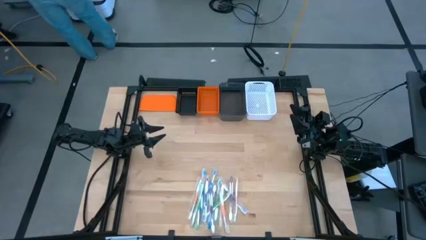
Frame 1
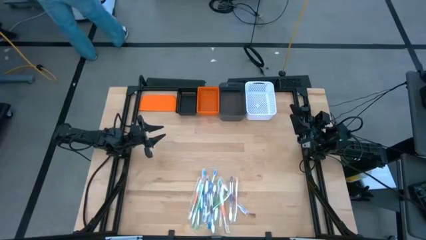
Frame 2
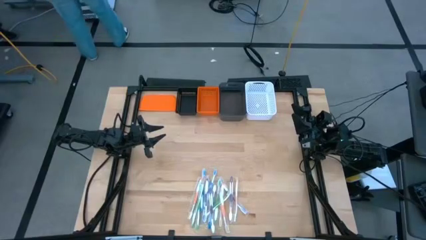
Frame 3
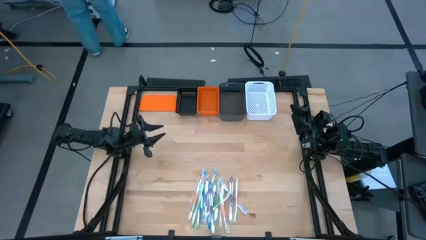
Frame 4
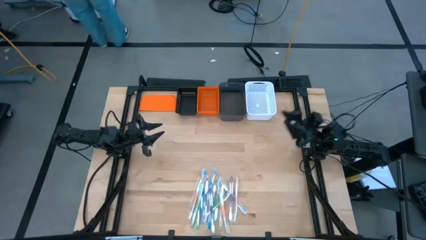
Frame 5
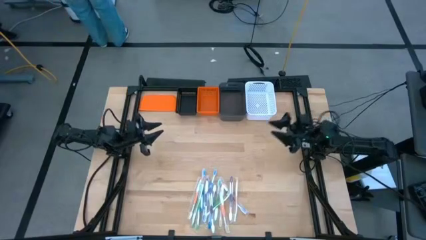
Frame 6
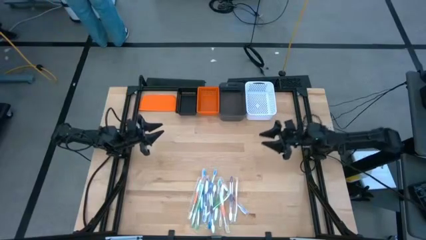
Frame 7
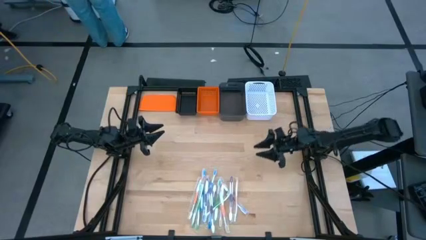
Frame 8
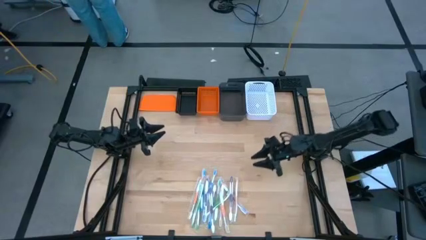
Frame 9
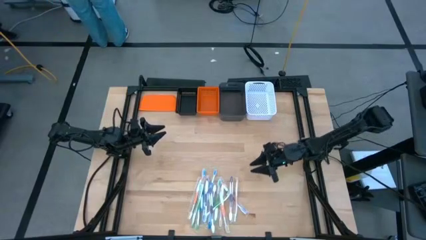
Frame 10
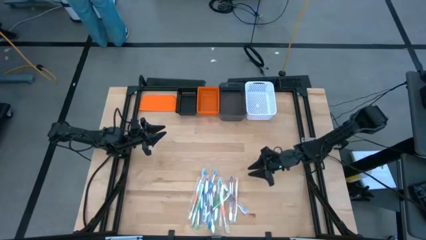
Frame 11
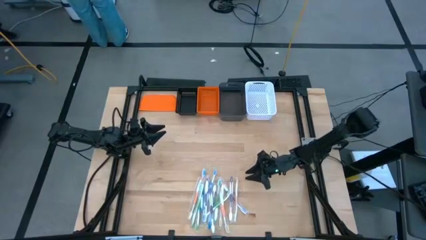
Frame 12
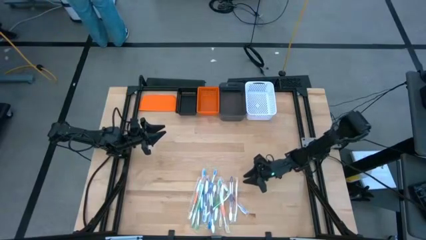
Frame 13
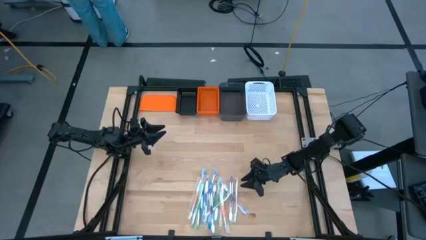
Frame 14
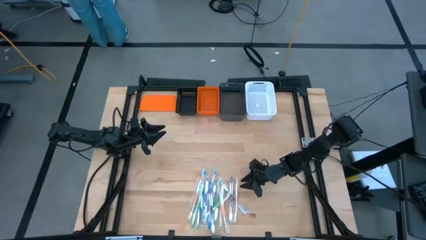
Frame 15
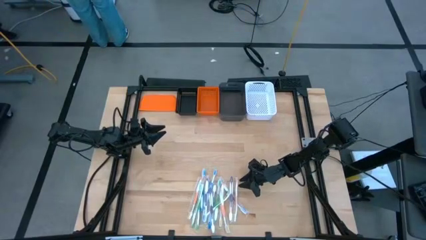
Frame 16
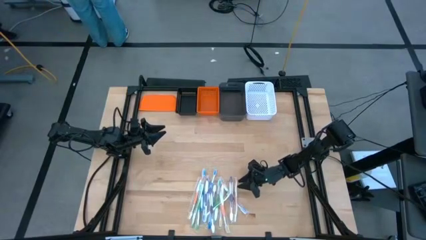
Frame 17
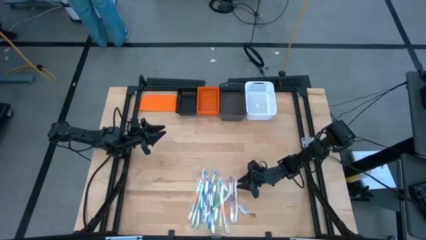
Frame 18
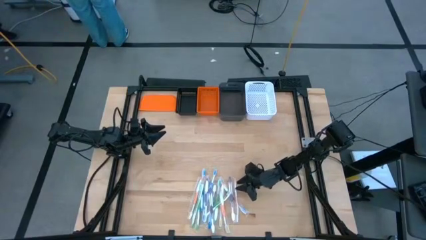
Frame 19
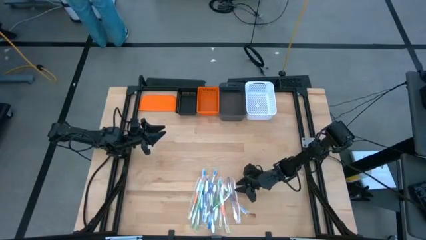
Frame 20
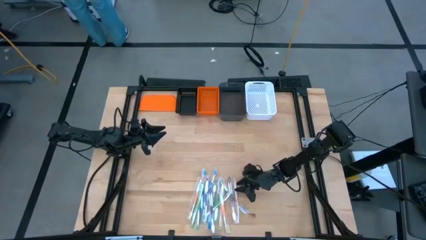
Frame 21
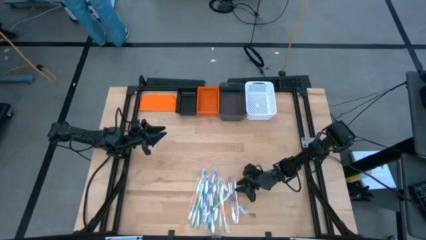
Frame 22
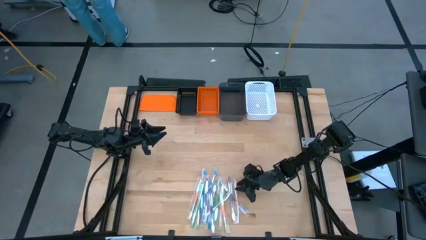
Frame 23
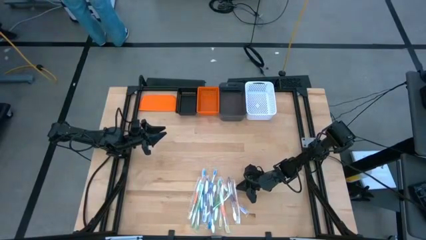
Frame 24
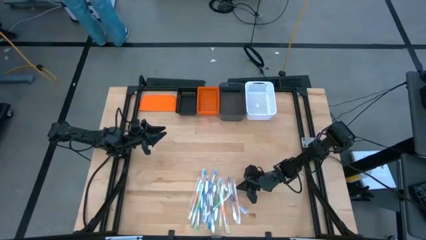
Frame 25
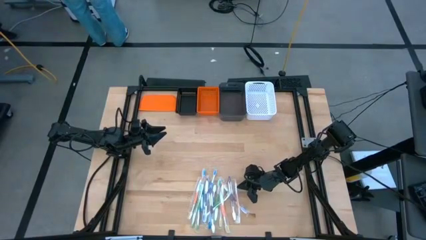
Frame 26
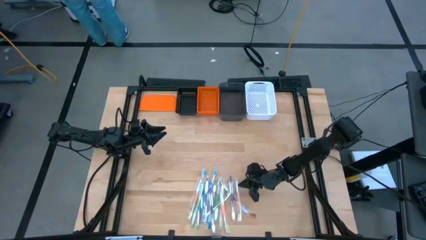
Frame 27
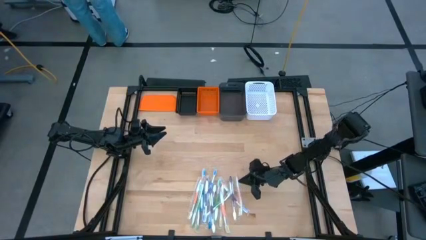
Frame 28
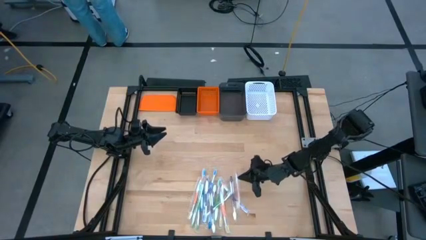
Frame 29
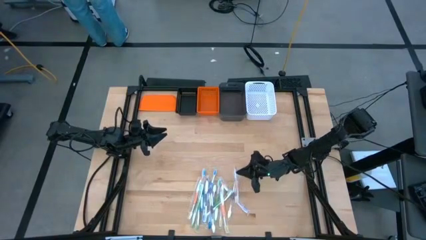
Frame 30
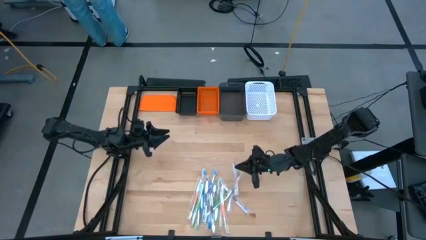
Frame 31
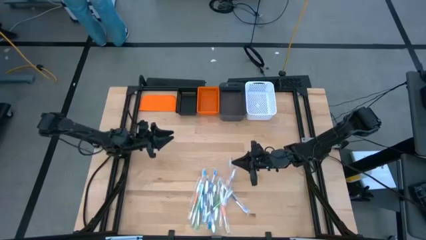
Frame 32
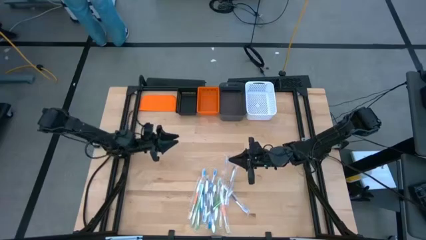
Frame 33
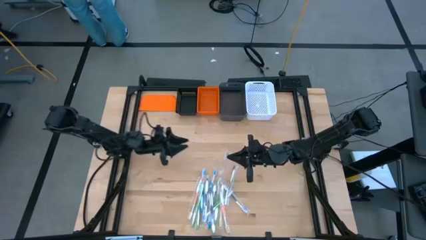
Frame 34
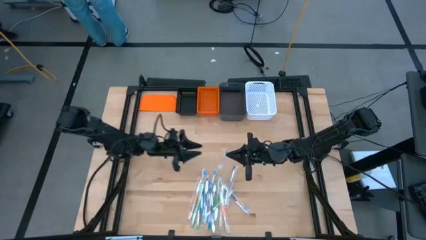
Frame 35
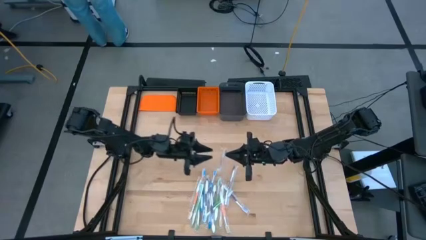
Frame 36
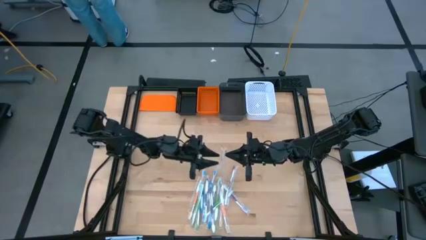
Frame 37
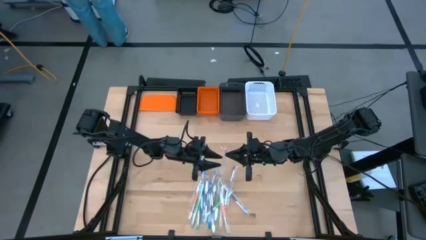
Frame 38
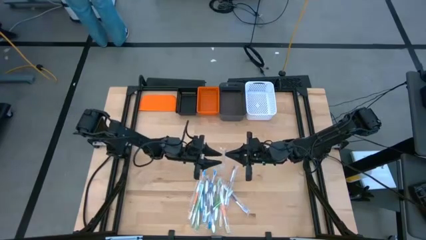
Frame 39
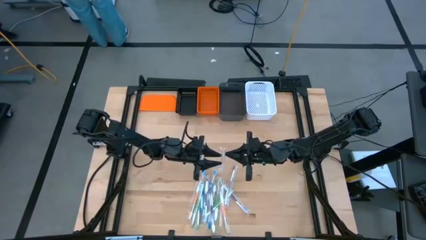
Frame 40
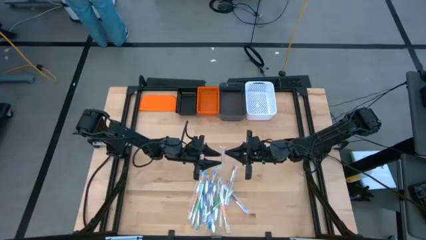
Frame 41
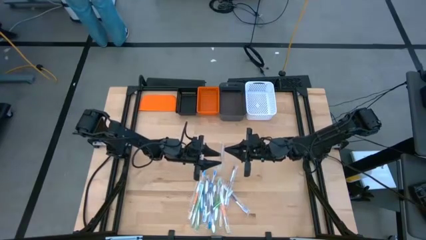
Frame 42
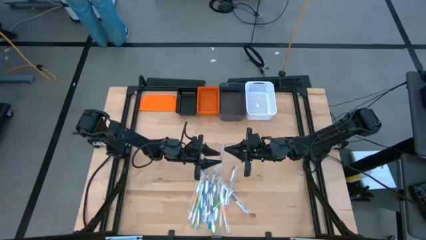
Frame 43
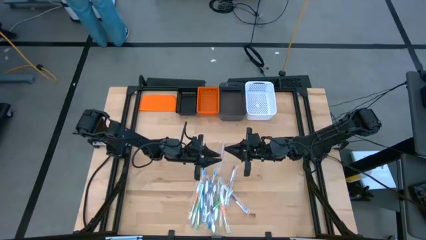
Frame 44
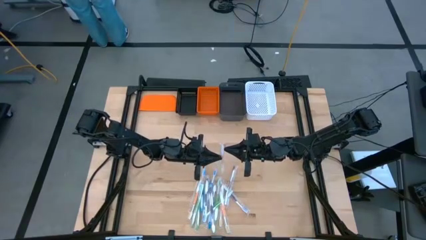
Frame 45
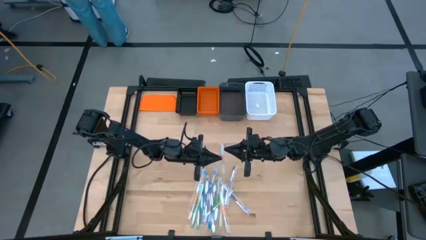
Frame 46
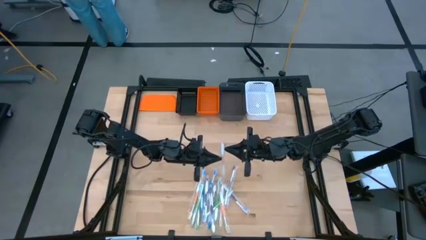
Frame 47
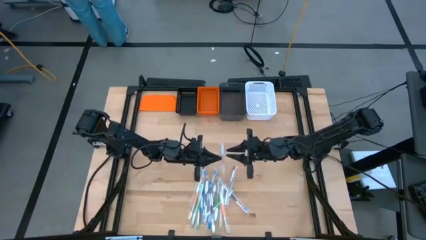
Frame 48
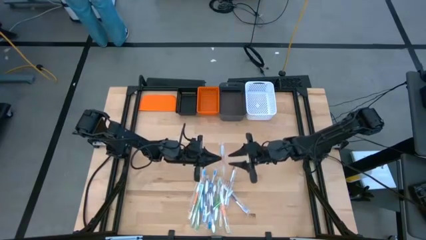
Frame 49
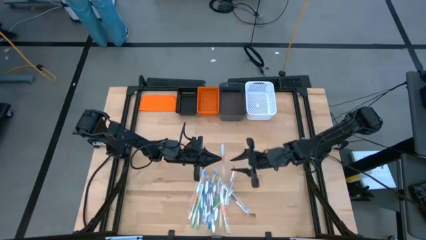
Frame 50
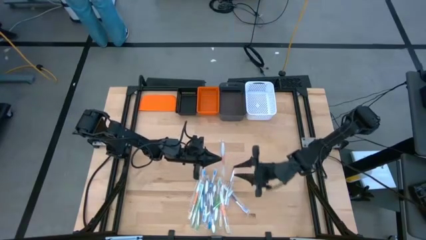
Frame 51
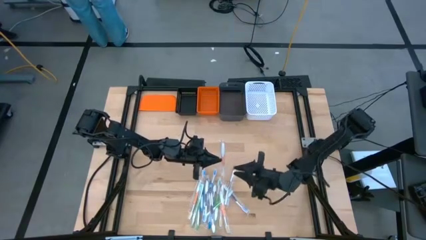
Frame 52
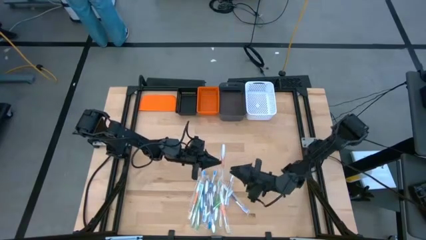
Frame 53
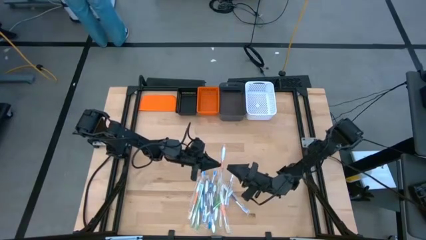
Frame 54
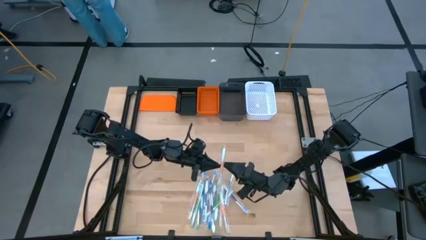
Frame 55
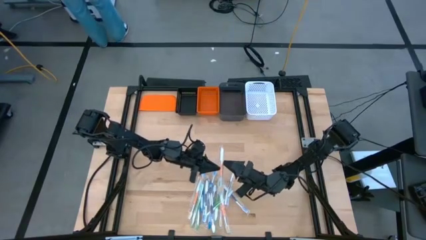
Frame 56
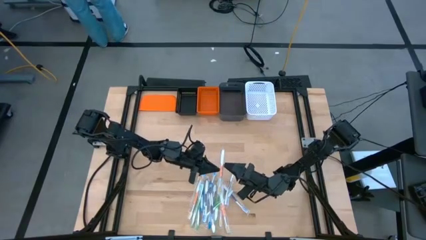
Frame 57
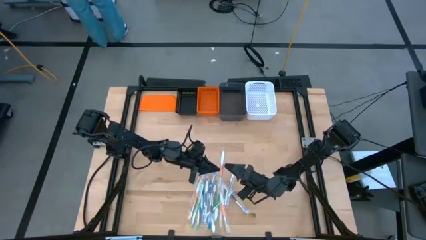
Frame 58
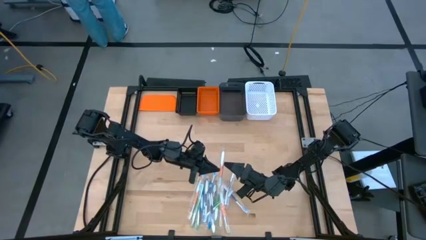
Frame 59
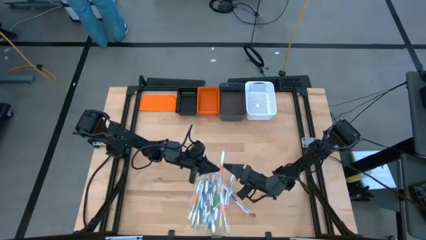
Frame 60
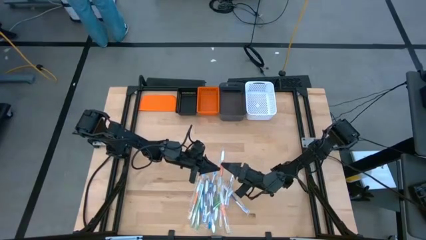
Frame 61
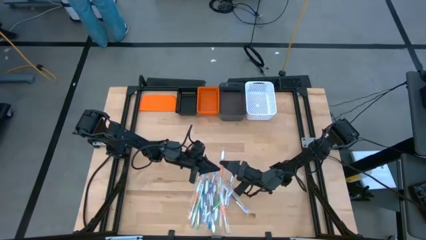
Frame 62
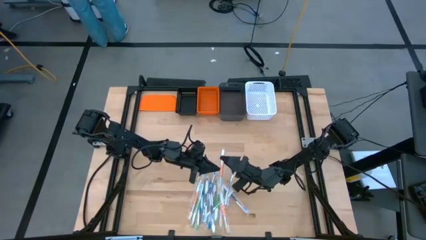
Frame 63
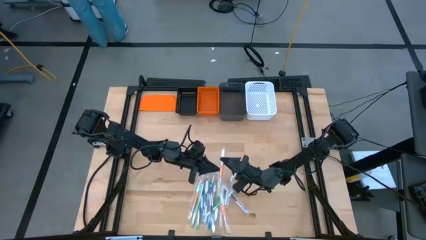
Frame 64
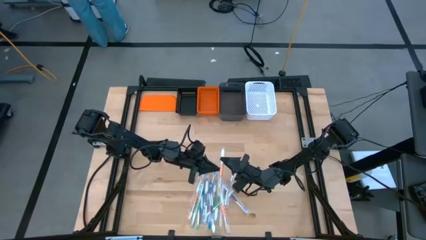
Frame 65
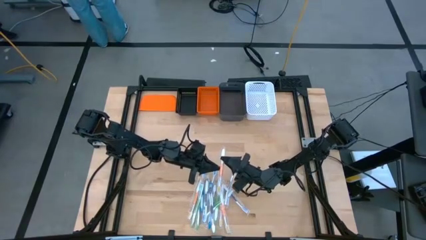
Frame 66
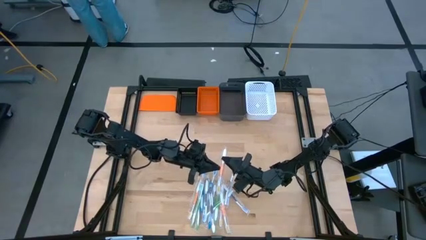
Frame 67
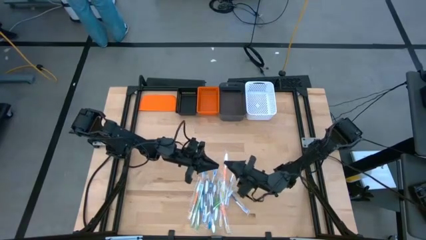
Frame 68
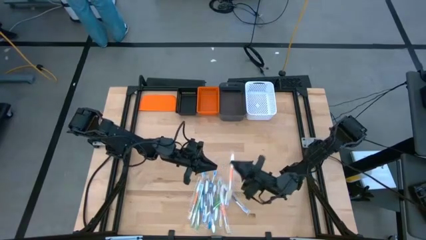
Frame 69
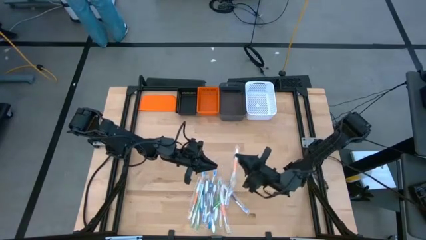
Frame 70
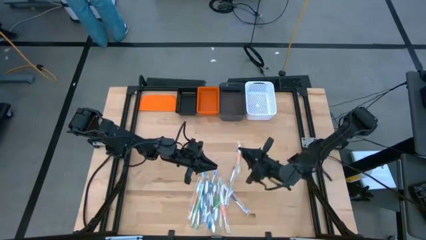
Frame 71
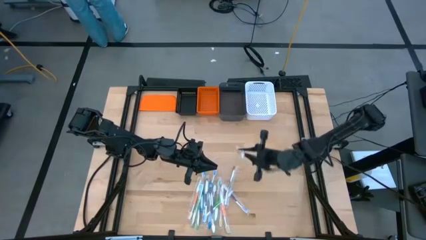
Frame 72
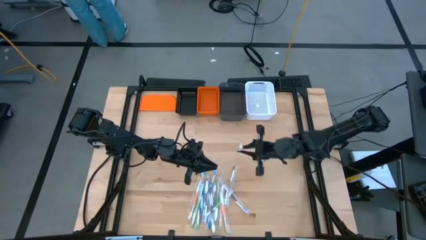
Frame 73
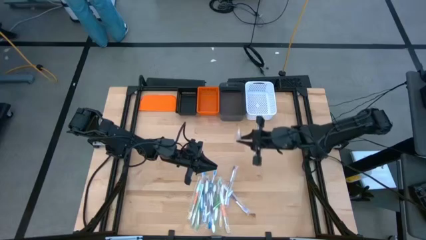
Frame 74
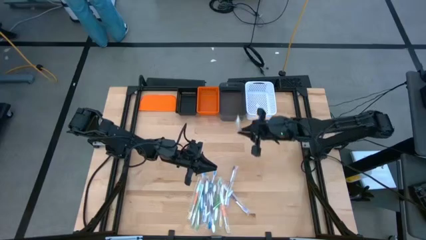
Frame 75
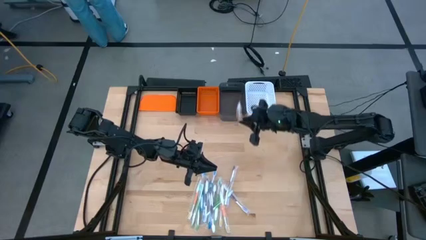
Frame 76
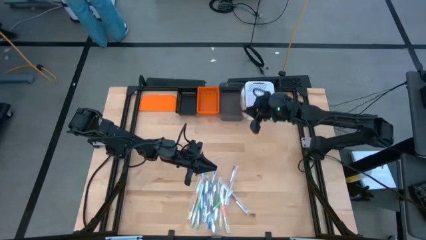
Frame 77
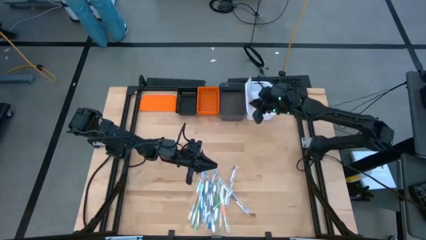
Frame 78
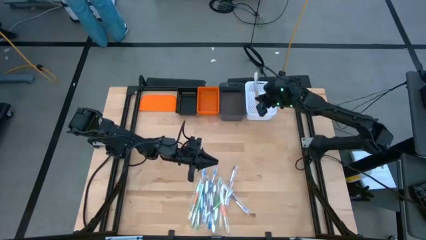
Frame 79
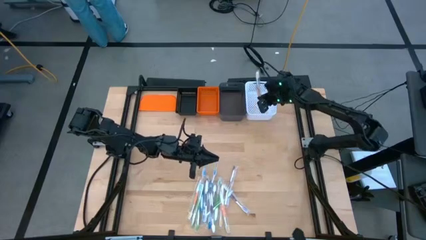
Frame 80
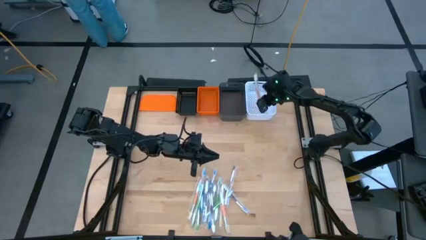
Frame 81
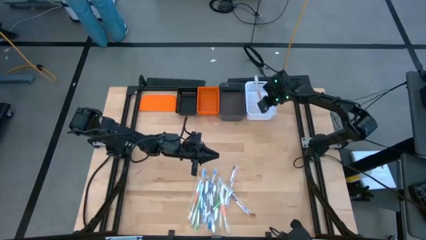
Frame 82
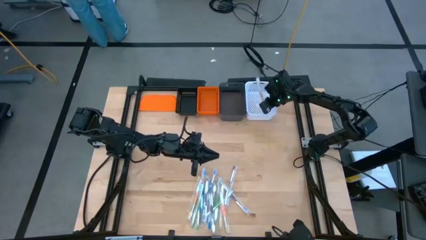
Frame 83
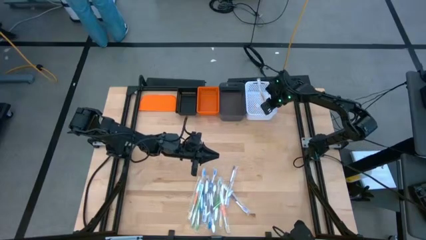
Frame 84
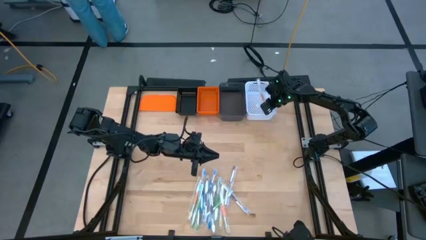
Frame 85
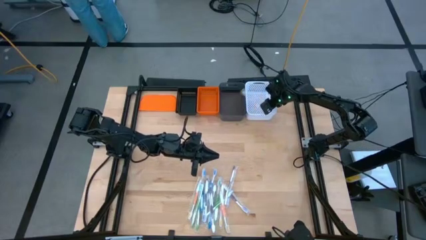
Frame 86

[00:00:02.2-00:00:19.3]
Task: Pick & Place Toothbrushes
Put the orange toothbrush into the white bin
